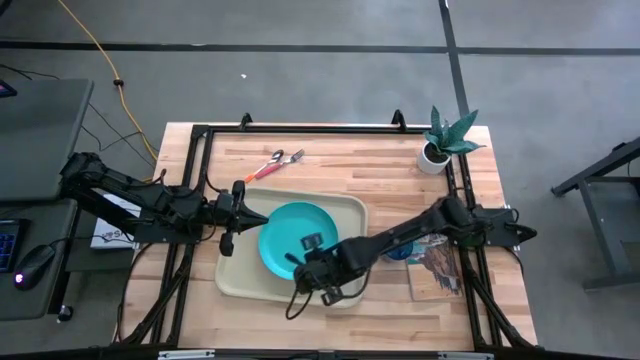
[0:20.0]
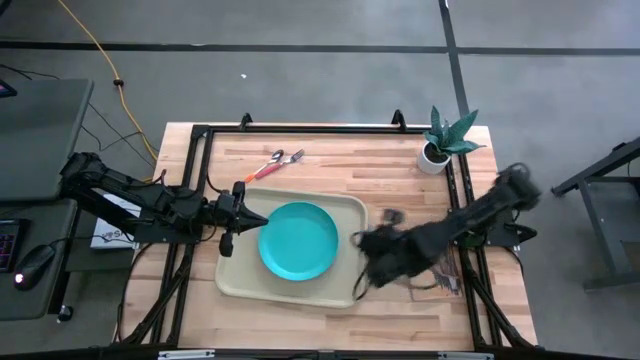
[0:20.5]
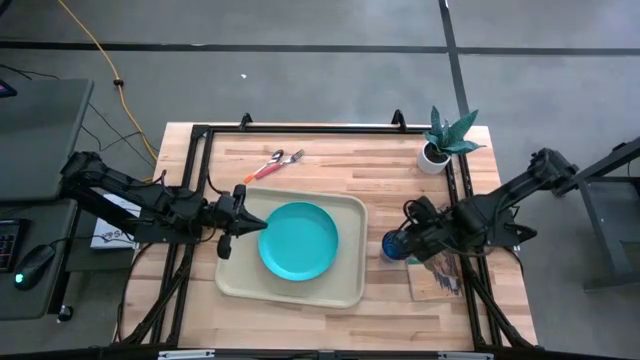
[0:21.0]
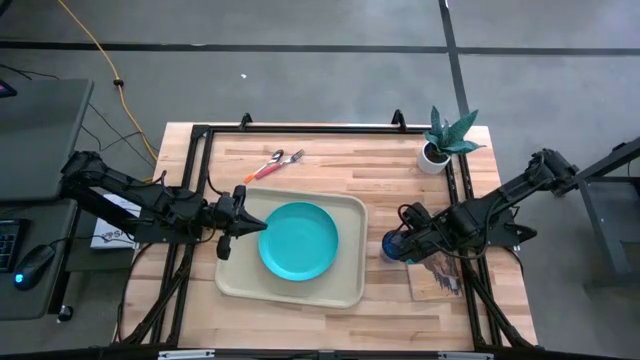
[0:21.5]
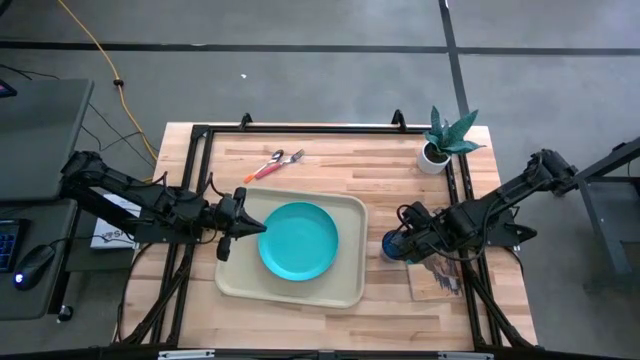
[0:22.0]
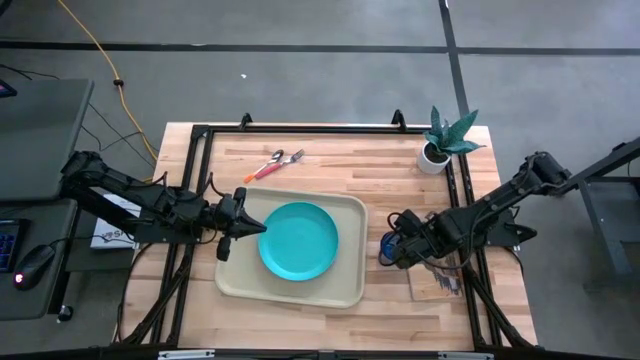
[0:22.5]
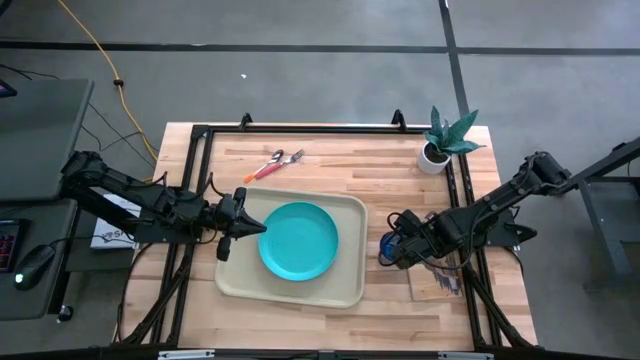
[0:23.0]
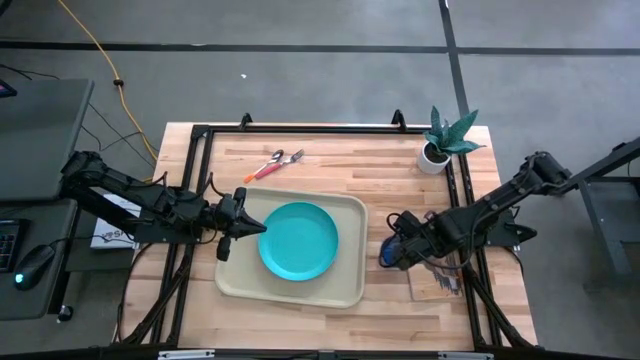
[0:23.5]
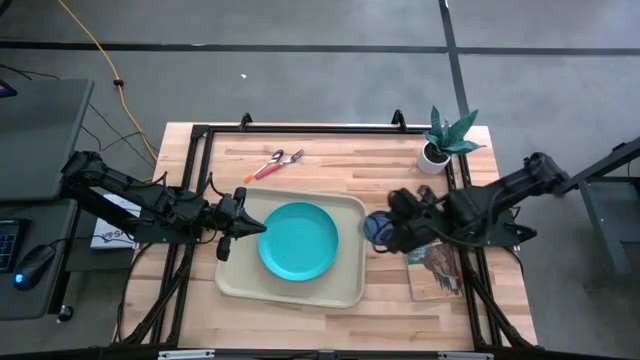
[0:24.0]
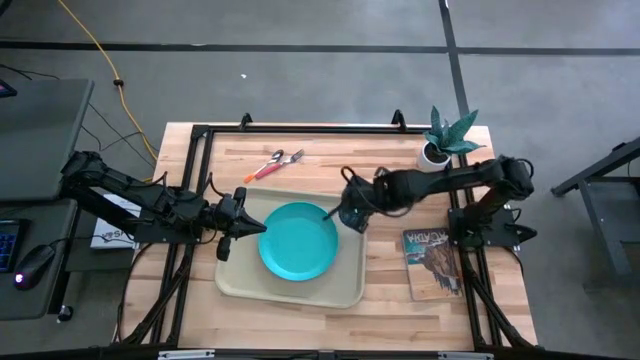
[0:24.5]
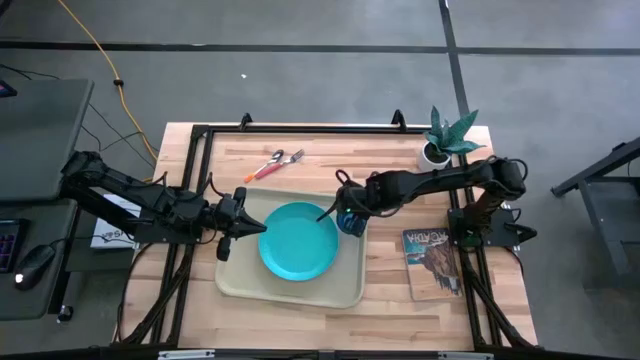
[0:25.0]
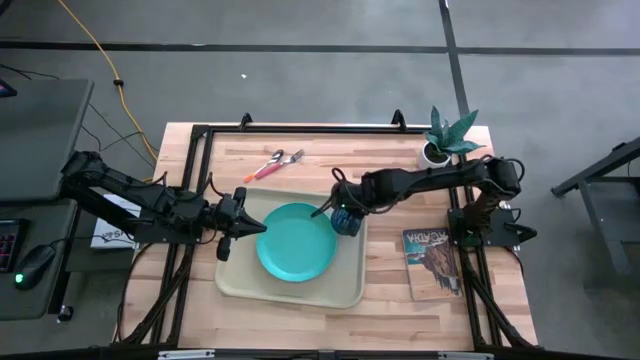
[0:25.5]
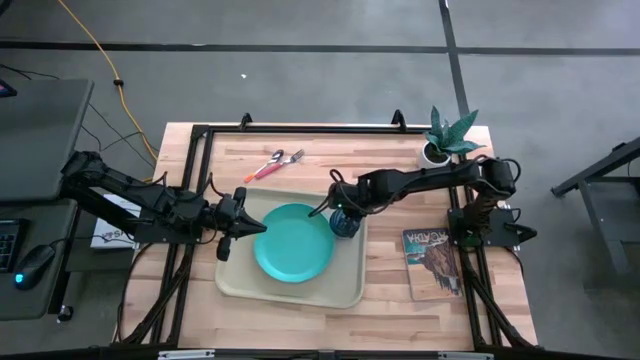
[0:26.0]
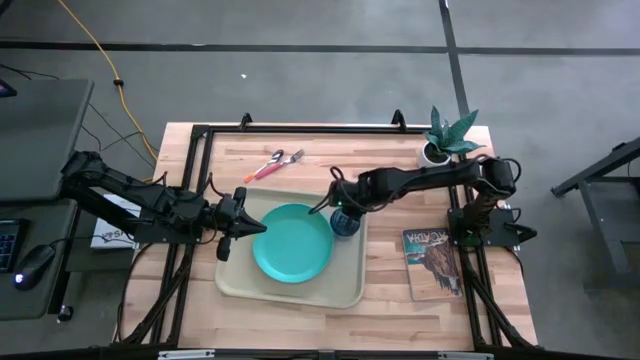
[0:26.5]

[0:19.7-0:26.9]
Task: Pick and place plate/cup/fork/spoon on tray
Put the blue crystal glass on the top right of the gray serving tray

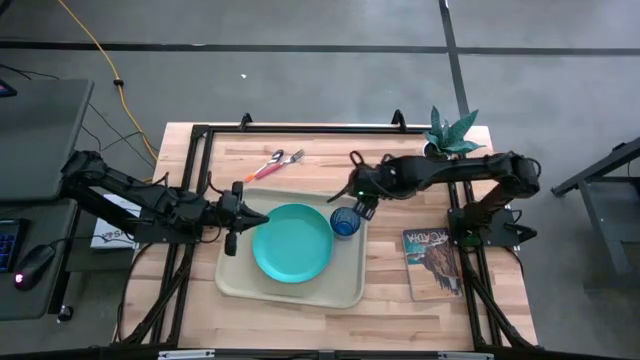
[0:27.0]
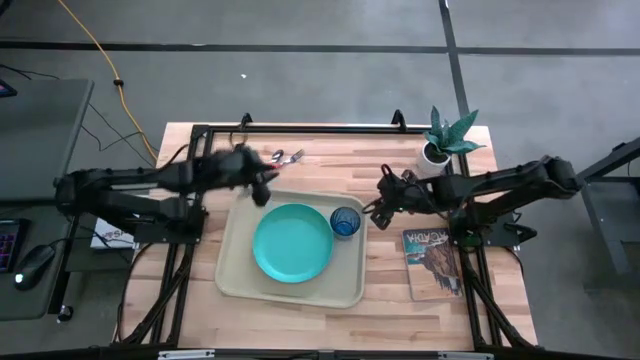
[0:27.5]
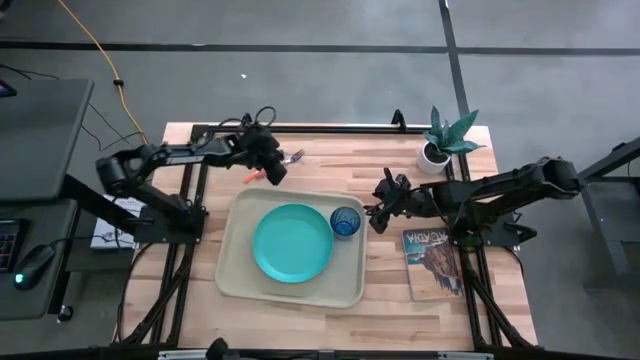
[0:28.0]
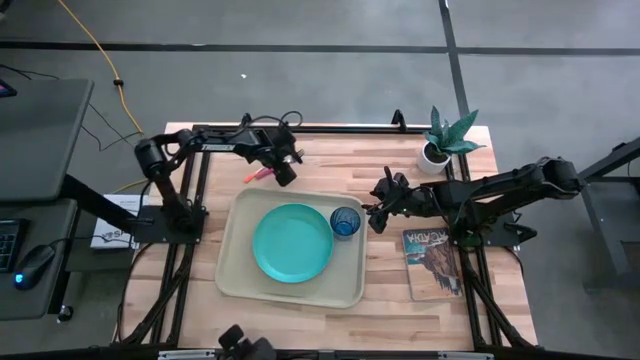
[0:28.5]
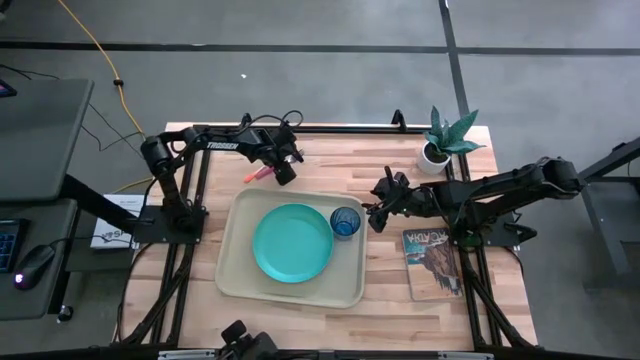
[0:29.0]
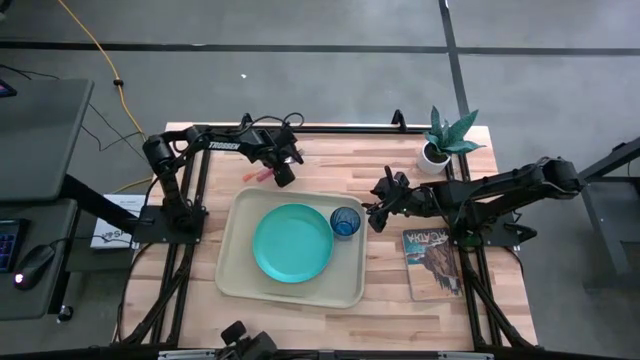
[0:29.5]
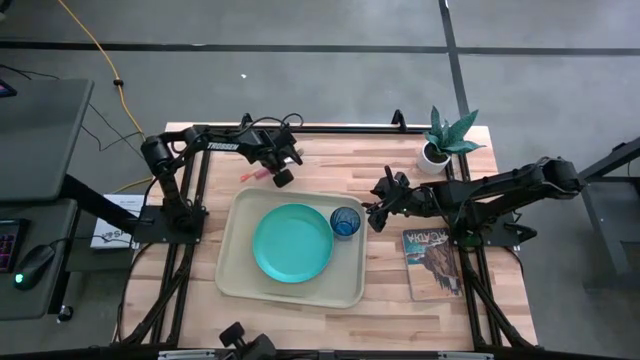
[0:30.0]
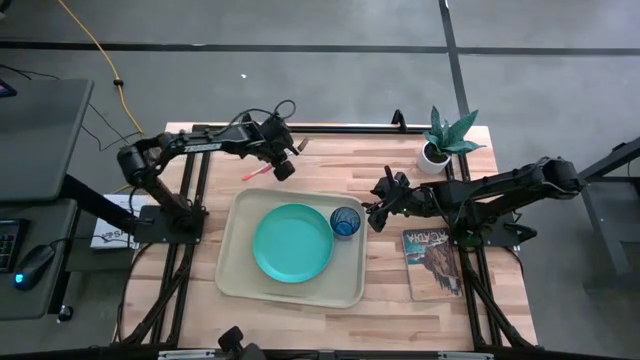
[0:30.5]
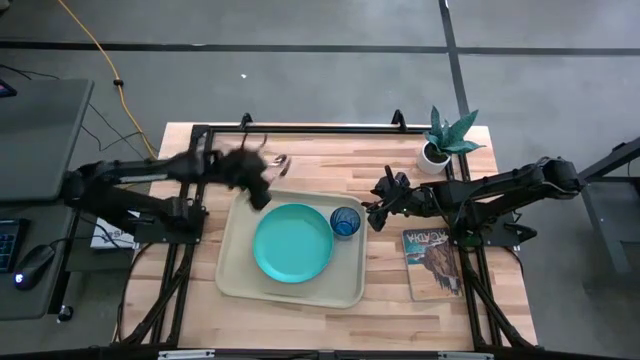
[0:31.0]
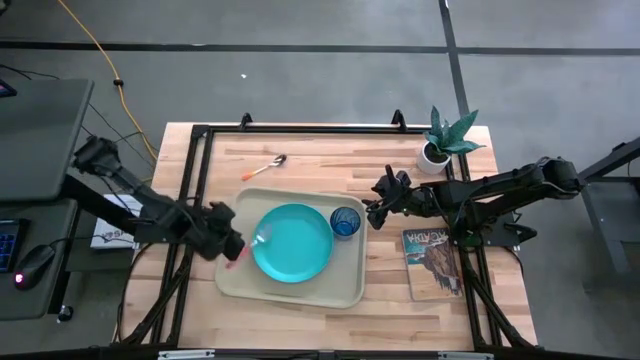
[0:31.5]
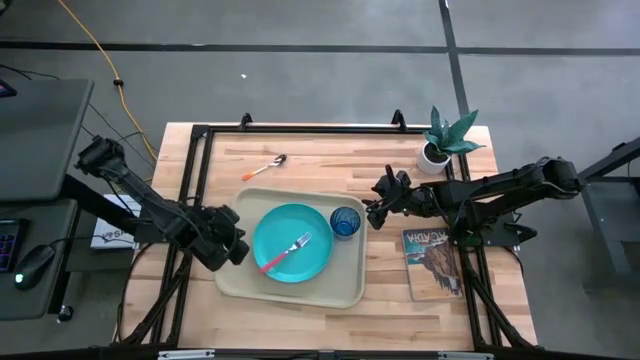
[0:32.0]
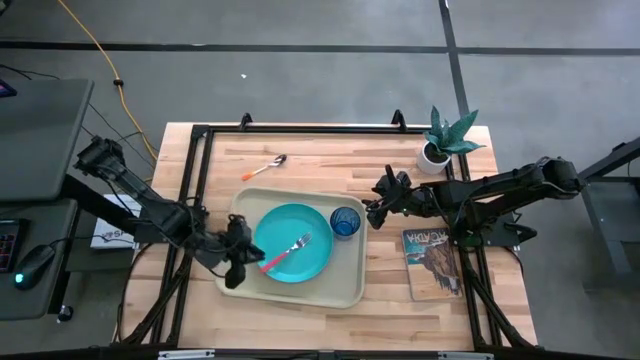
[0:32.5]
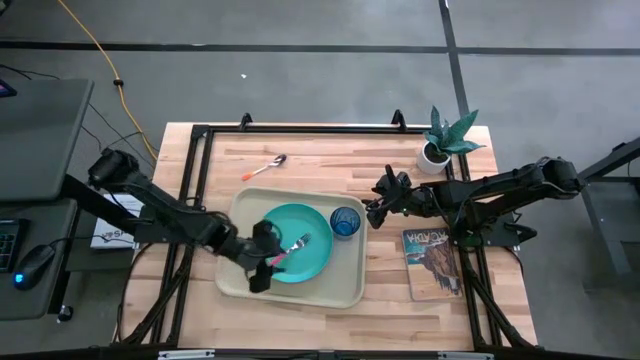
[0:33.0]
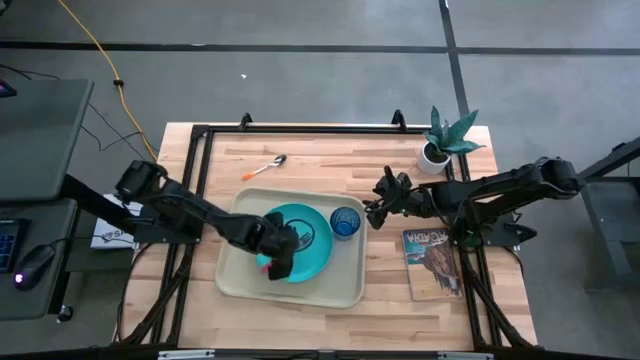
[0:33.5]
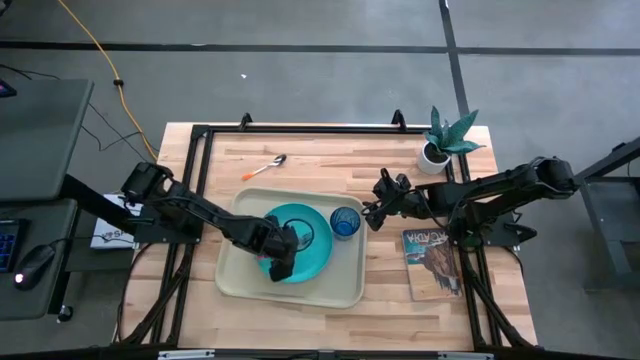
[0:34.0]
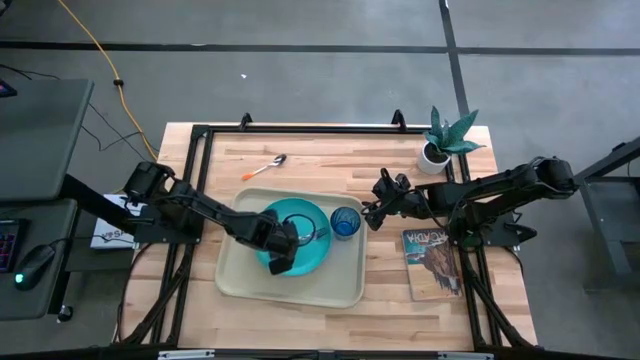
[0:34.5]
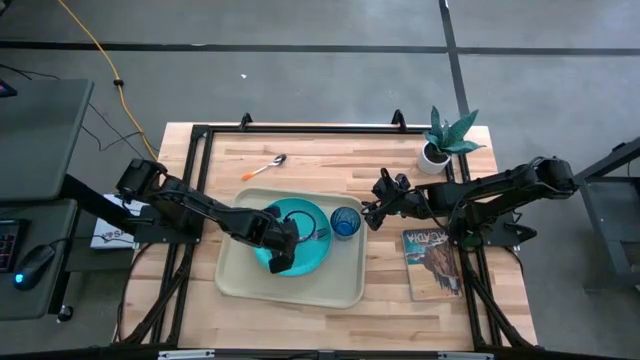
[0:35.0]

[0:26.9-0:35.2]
Put the pink fork to the left side of the light blue plate on the gray serving tray

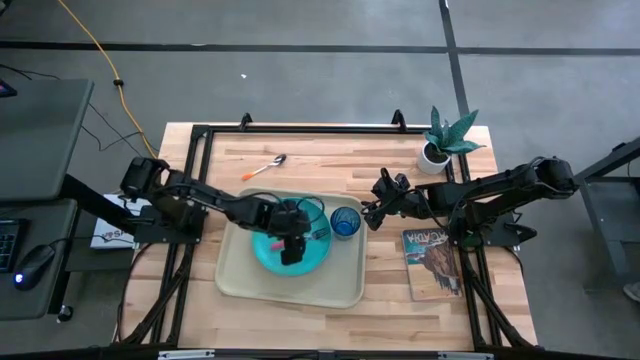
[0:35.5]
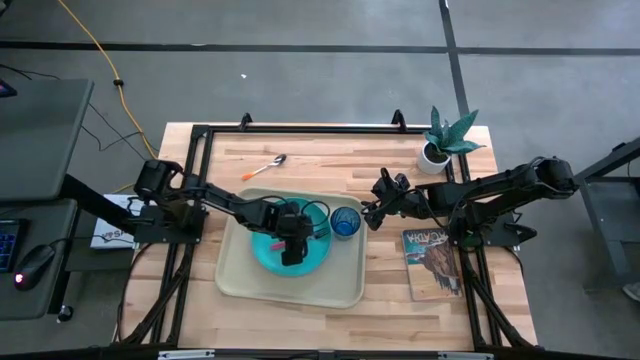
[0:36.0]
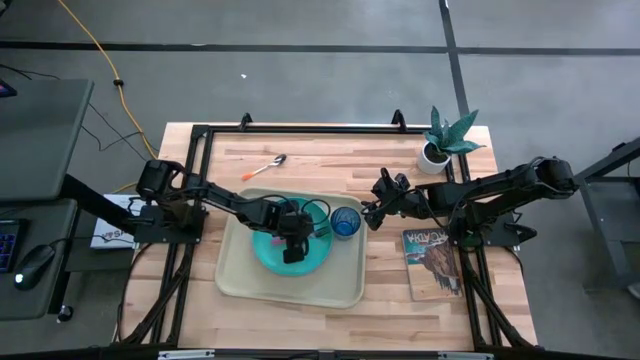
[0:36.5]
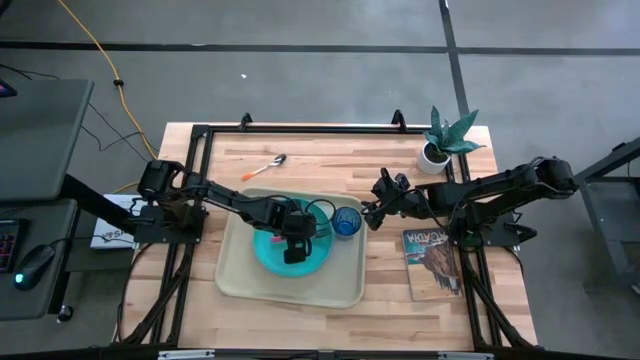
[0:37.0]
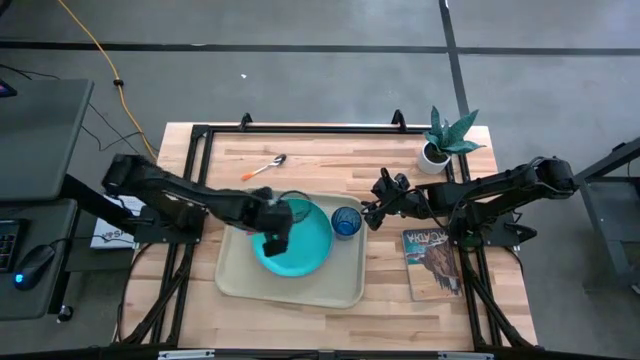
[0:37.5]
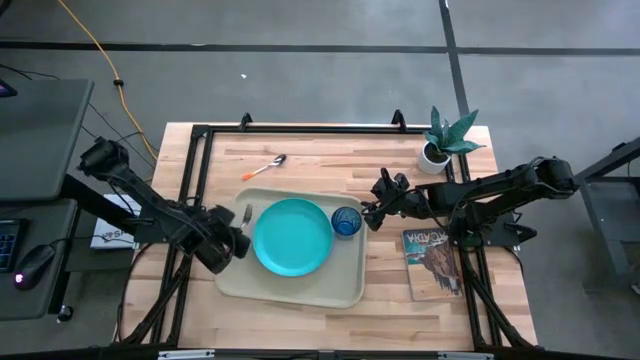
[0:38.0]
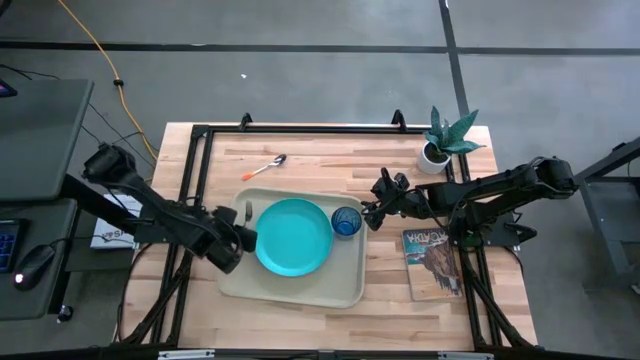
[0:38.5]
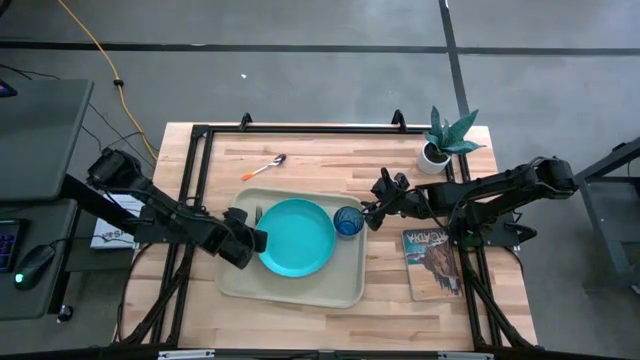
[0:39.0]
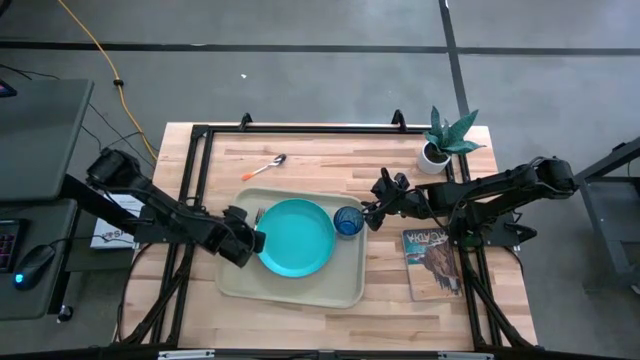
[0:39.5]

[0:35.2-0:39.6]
Put the pink fork to the left side of the light blue plate on the gray serving tray

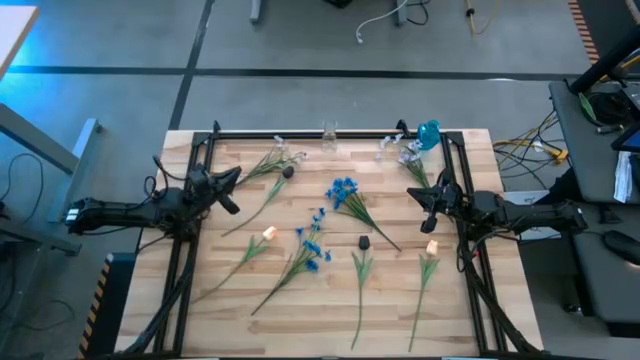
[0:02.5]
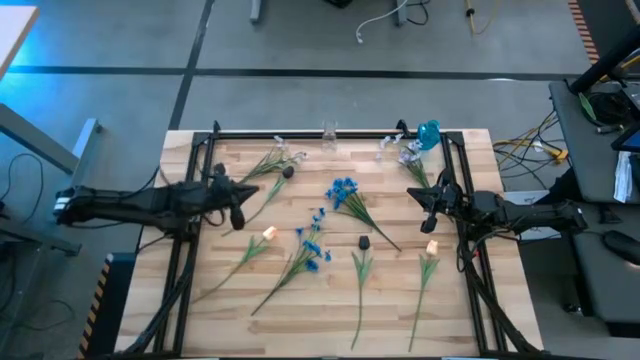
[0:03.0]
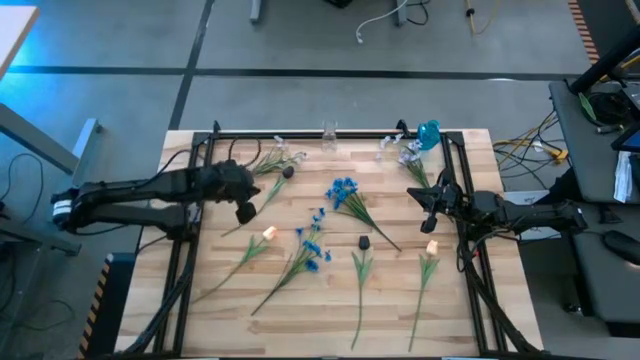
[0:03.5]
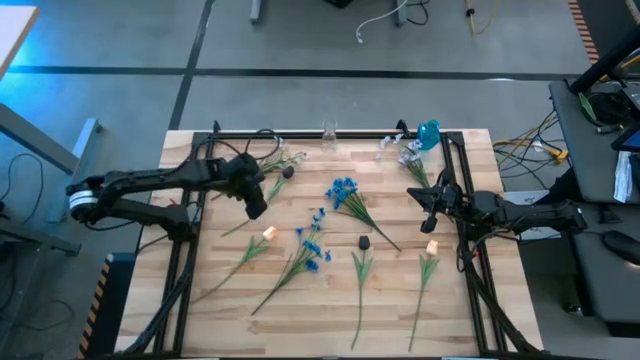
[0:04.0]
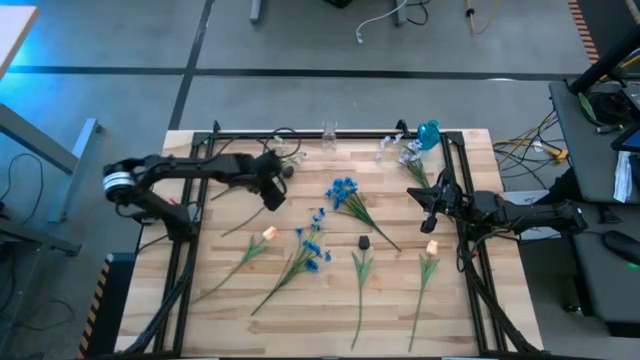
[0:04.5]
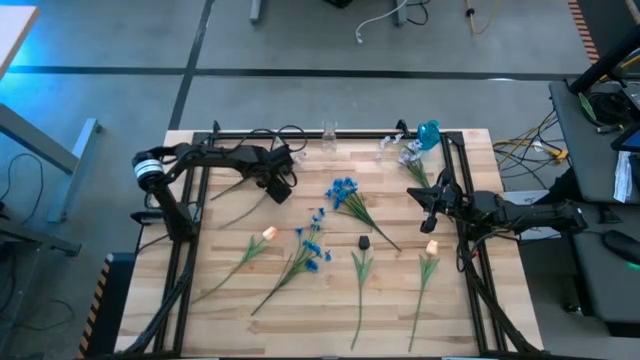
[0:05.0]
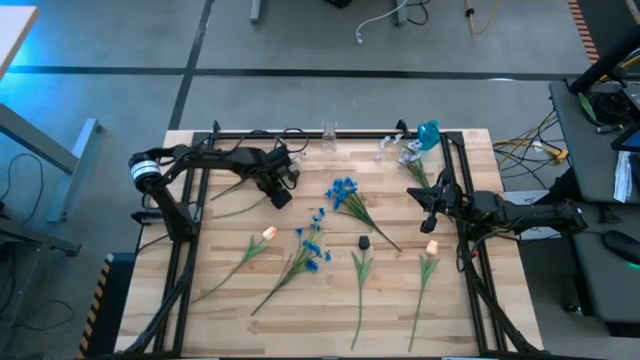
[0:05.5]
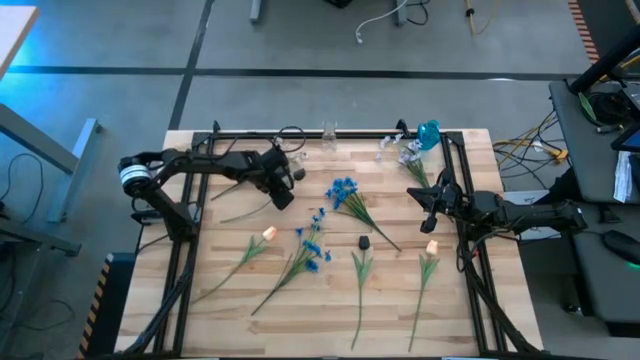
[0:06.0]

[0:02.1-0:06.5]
Task: Sort flowers into vase by color
Put the top black tulip into the transparent vase
